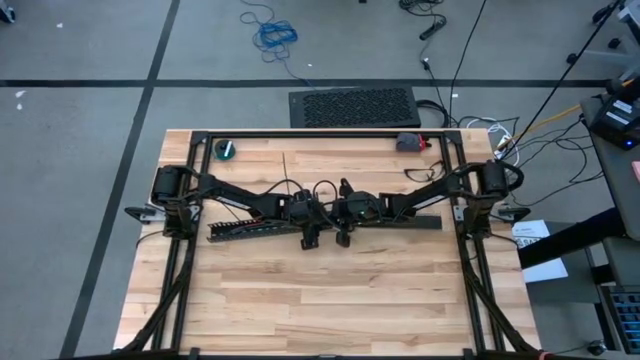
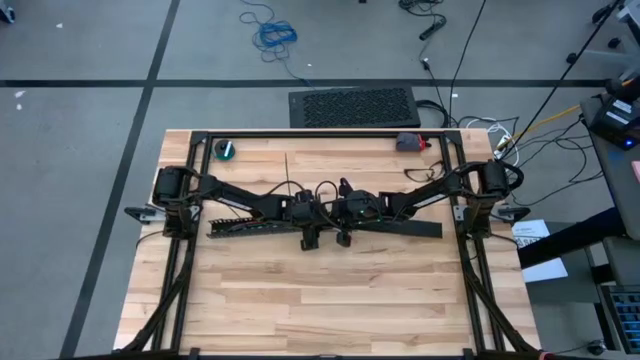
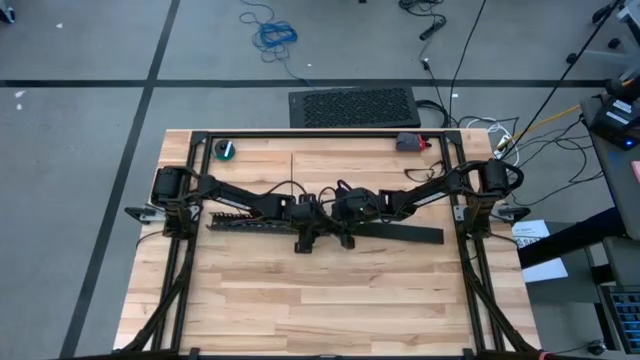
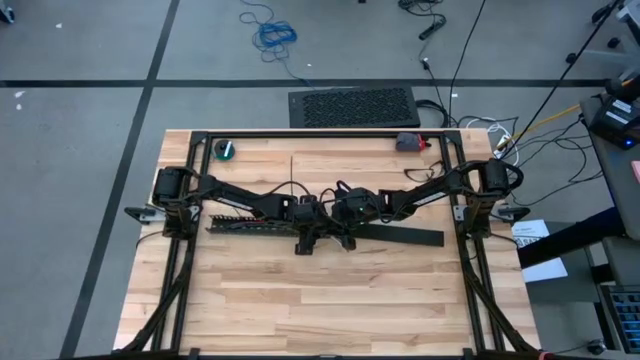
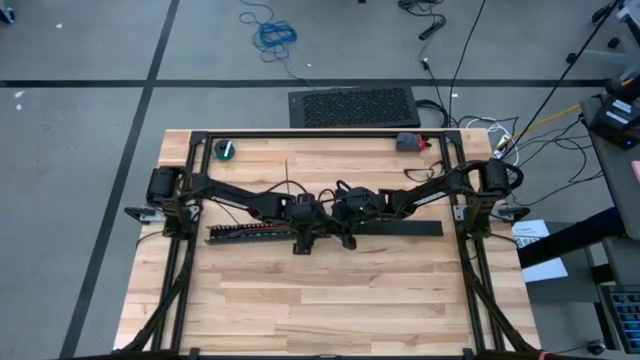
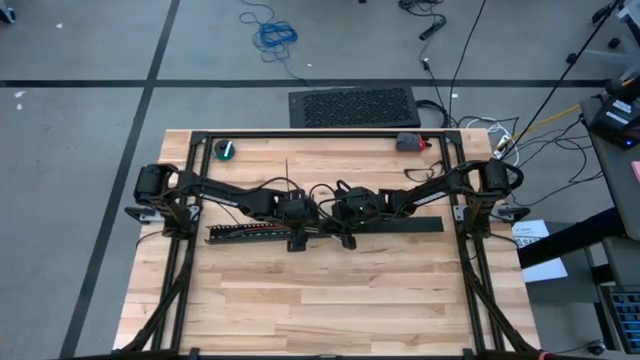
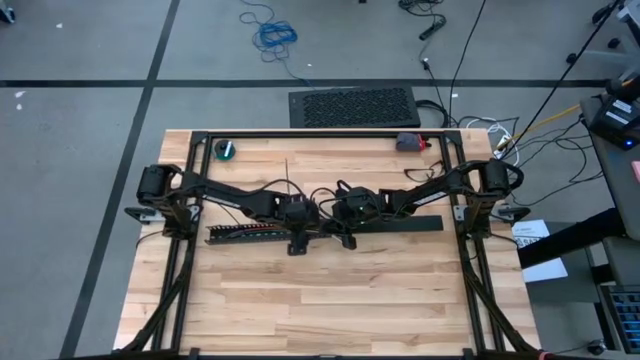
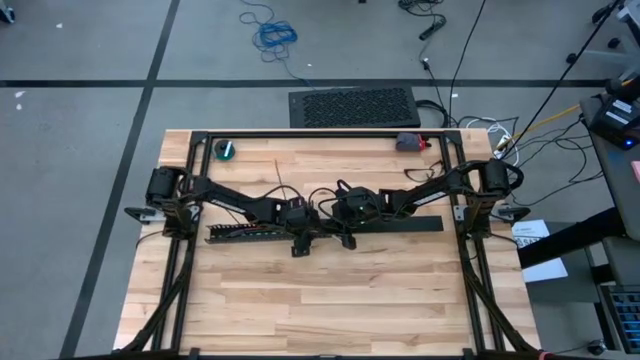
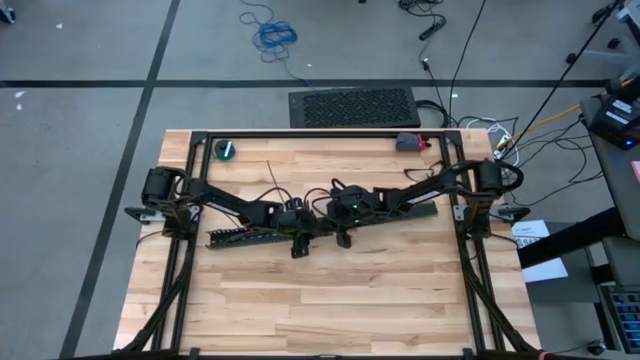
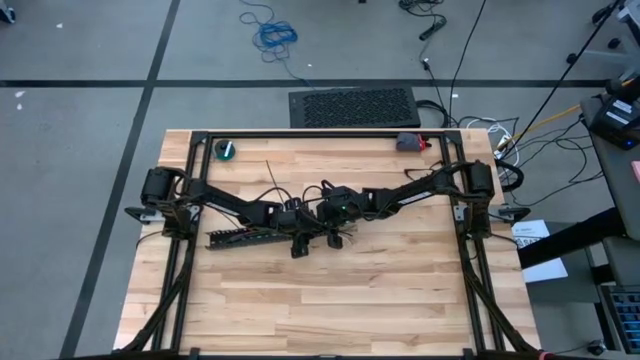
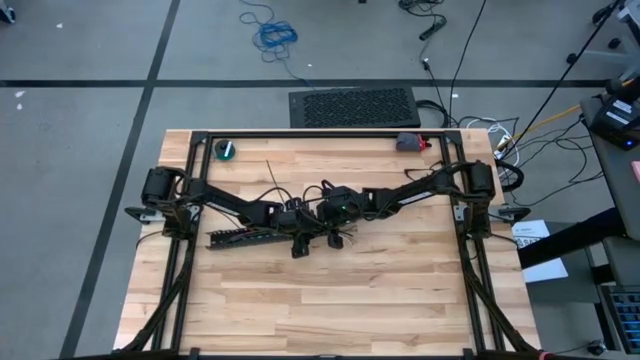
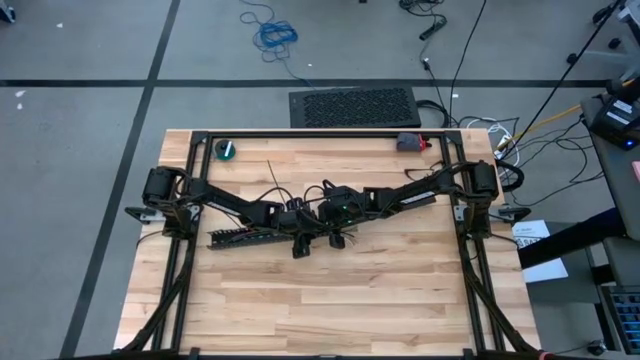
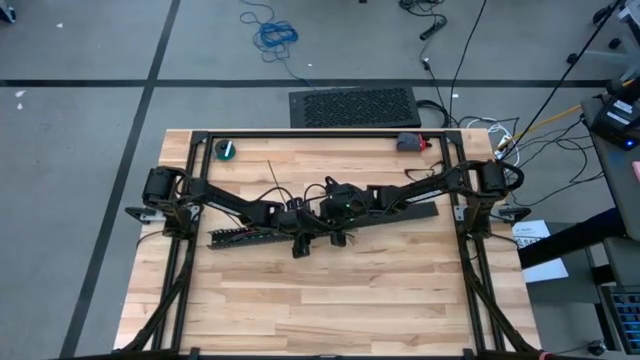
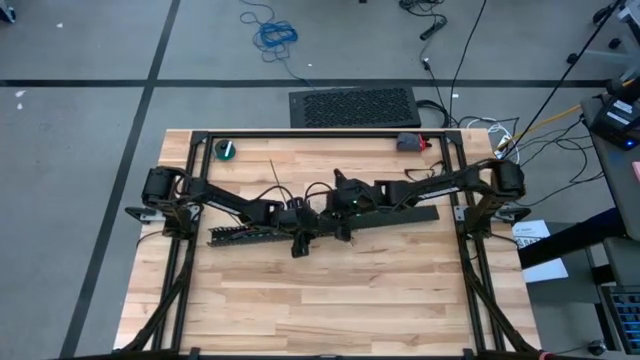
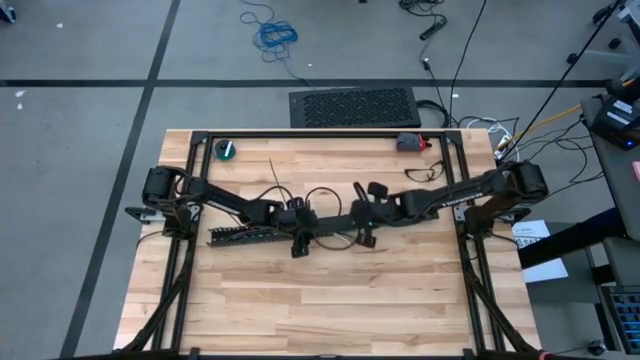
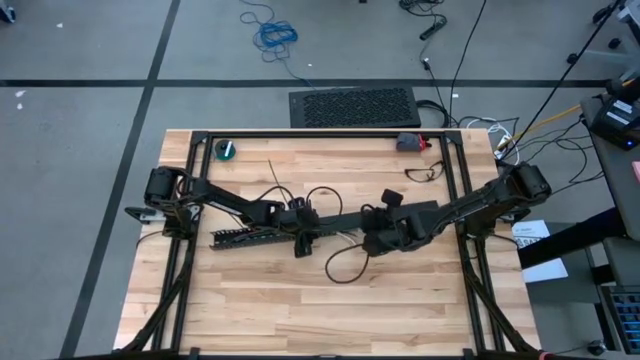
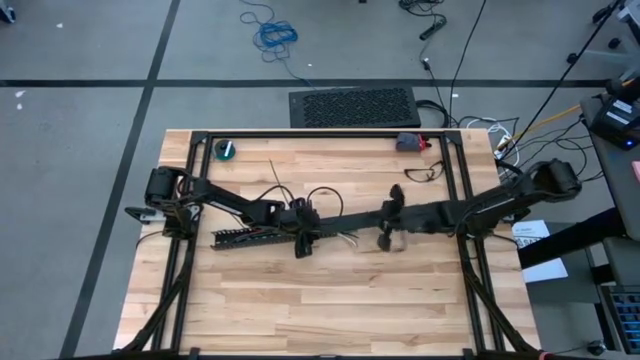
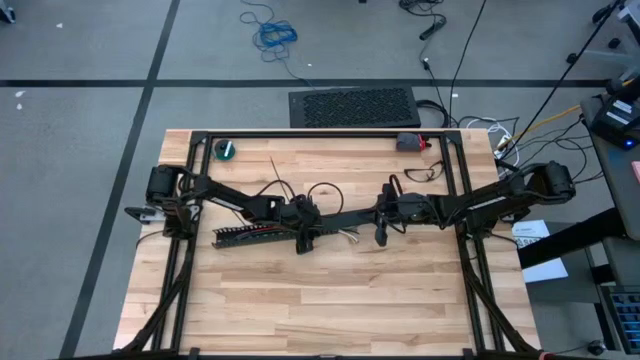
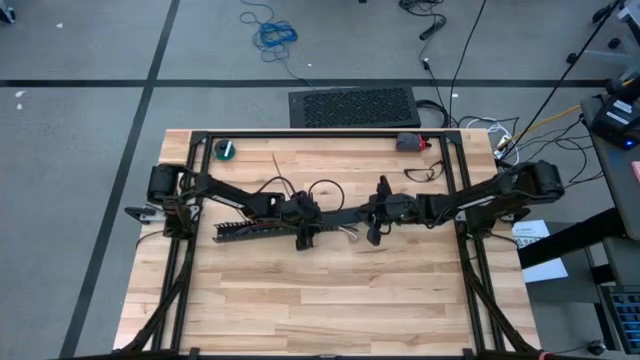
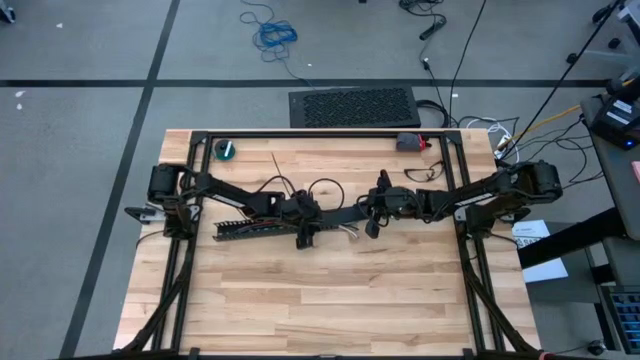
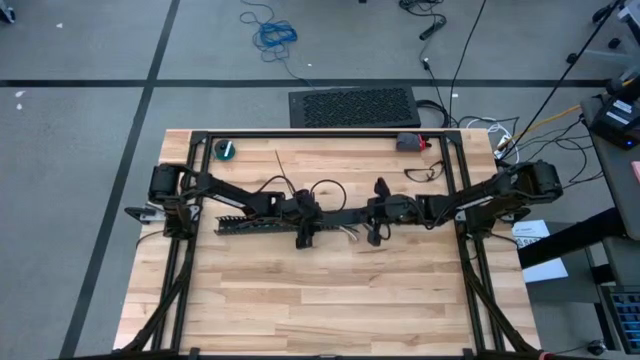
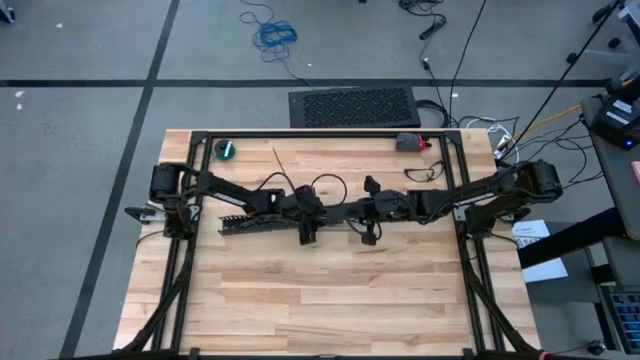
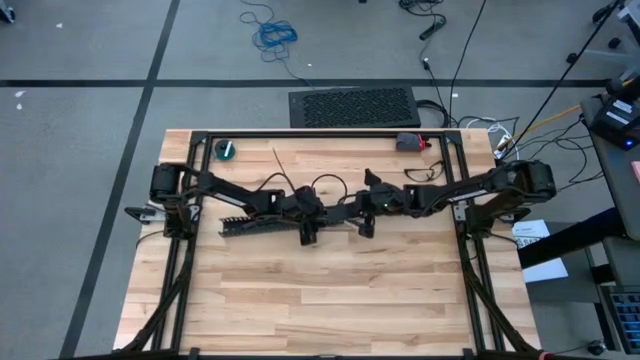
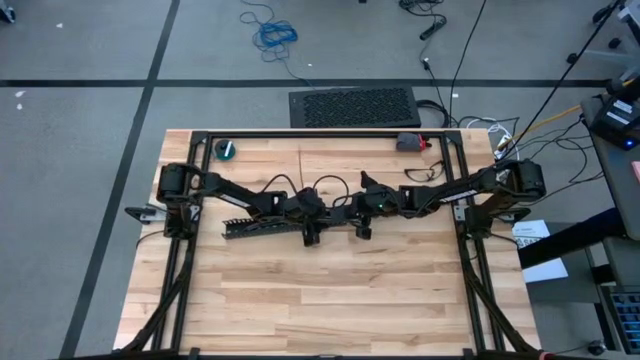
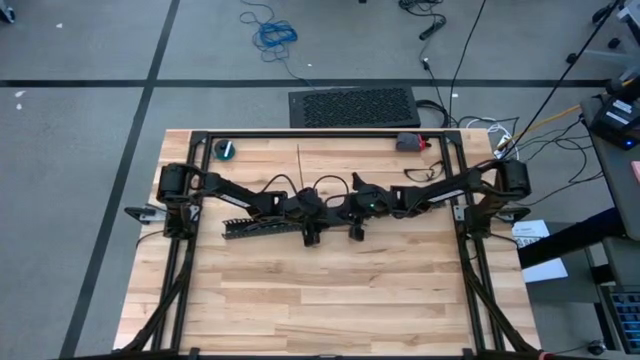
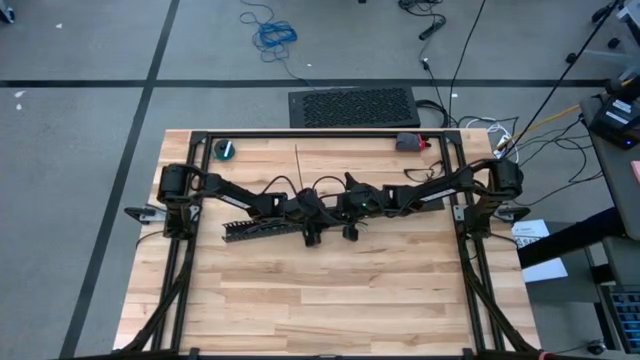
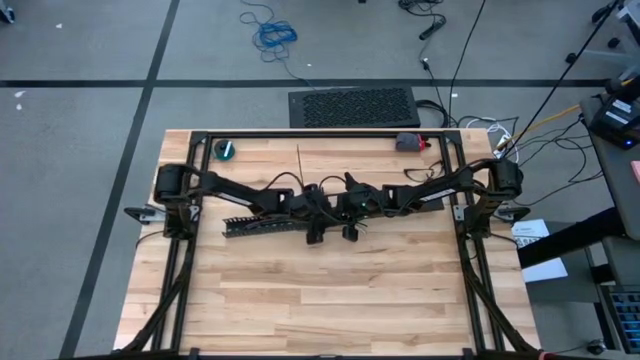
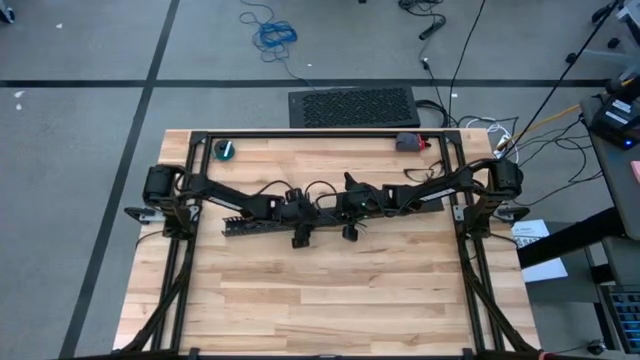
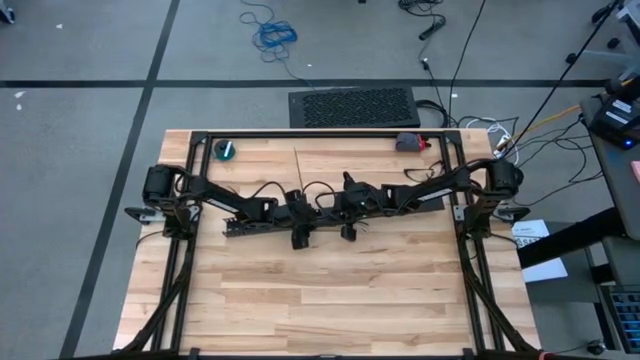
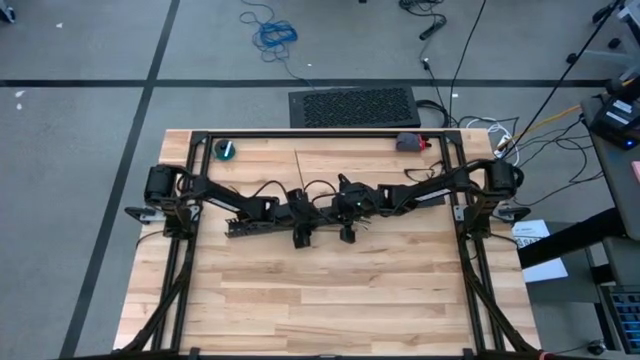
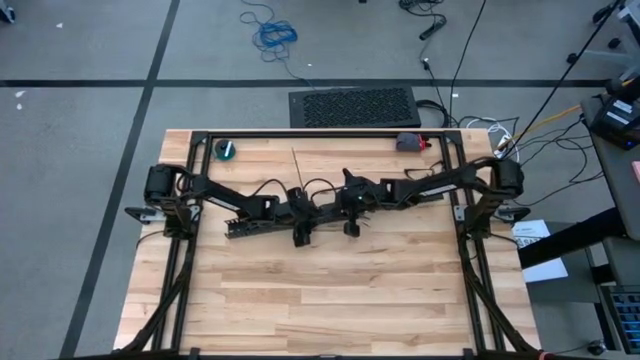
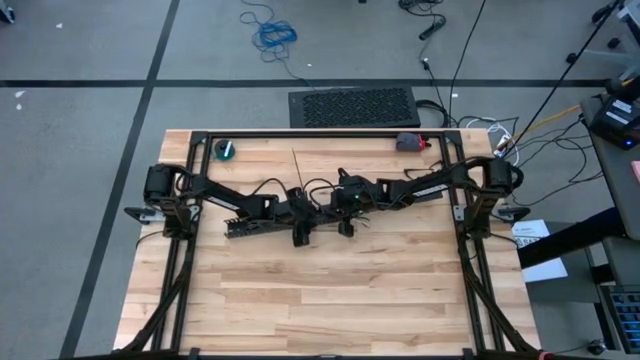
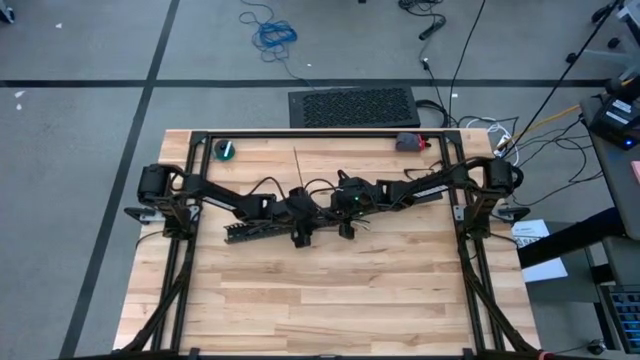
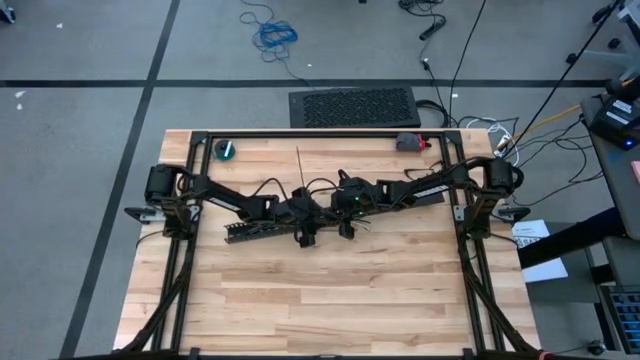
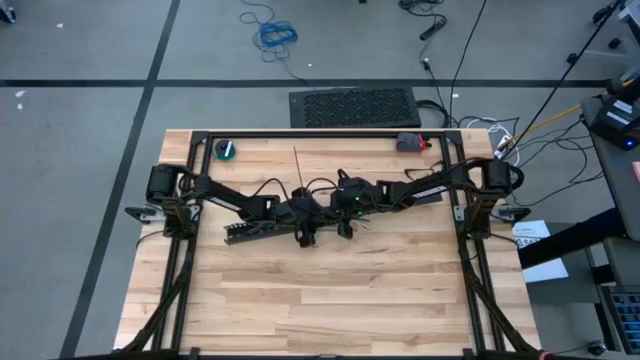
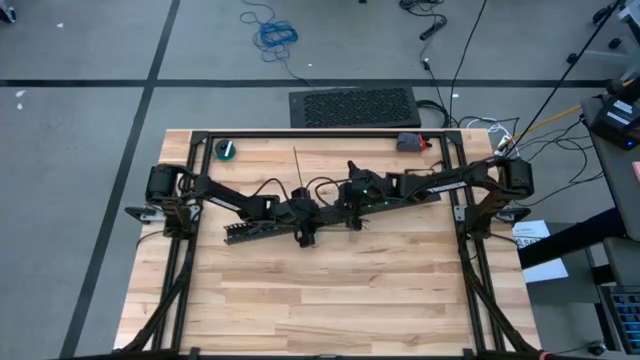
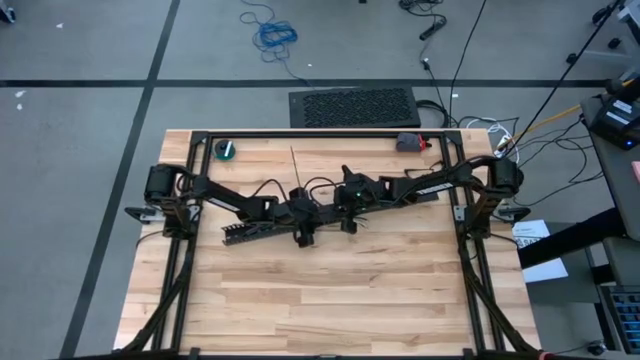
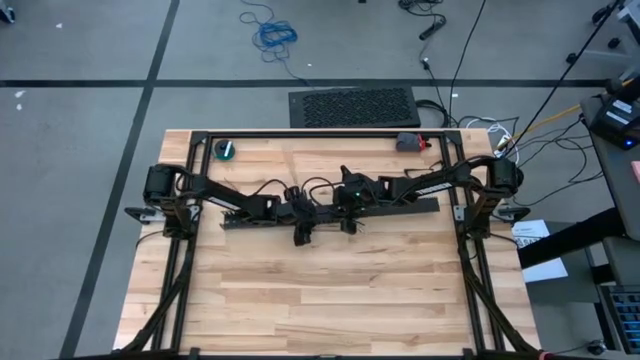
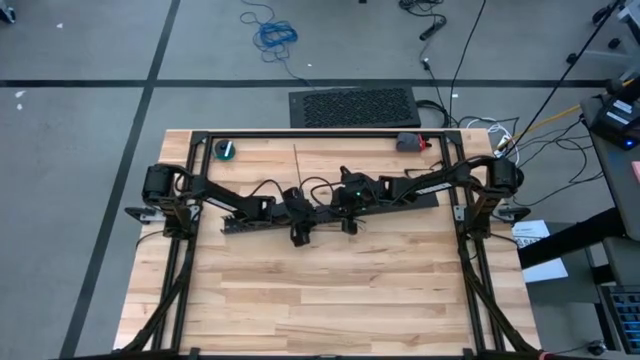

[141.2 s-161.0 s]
Task: Ziptie cables
Insert the cable duct cover
